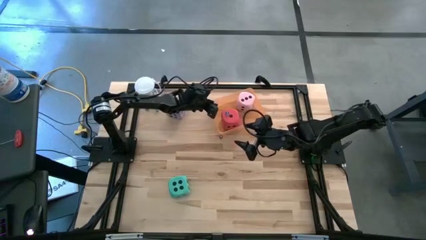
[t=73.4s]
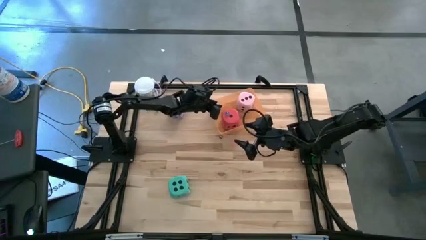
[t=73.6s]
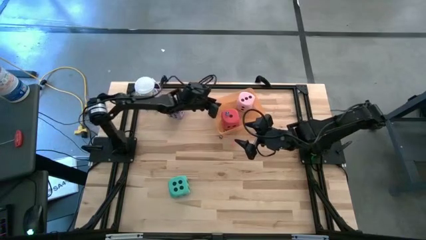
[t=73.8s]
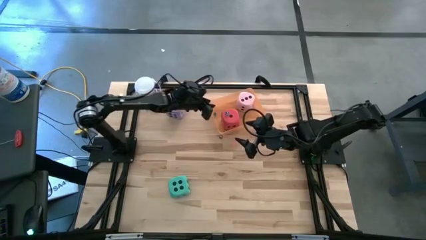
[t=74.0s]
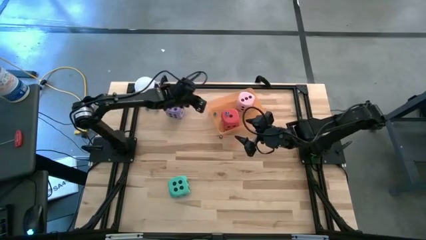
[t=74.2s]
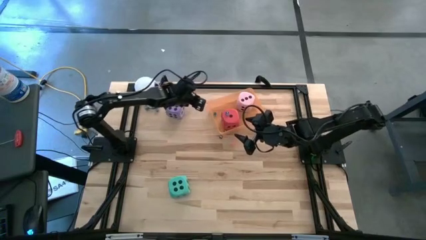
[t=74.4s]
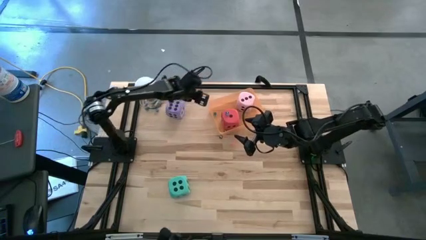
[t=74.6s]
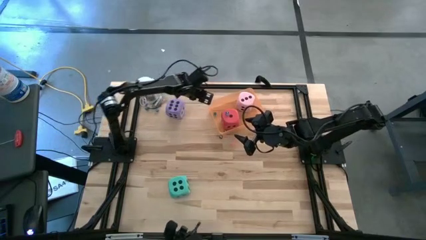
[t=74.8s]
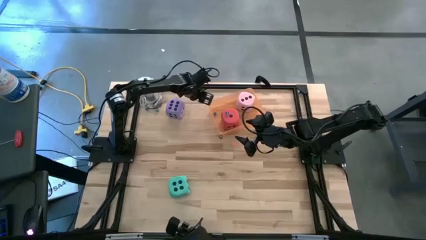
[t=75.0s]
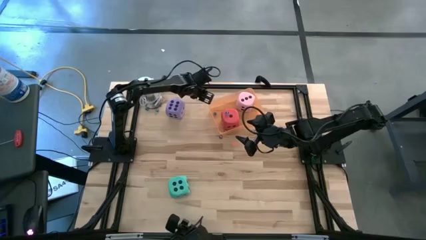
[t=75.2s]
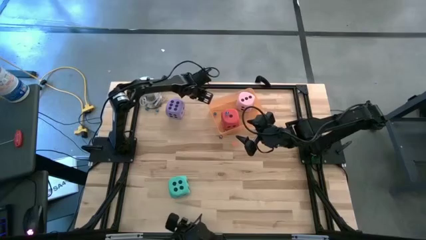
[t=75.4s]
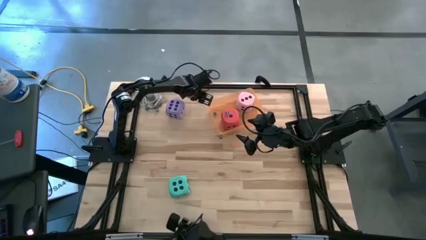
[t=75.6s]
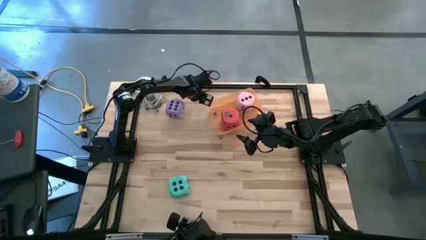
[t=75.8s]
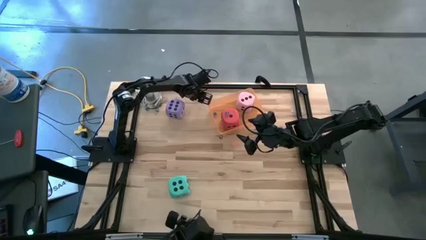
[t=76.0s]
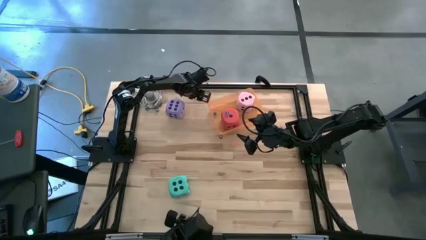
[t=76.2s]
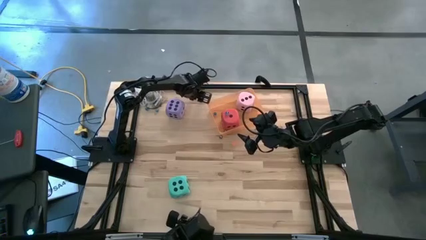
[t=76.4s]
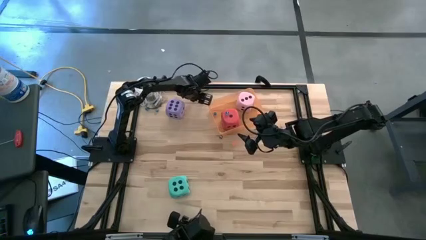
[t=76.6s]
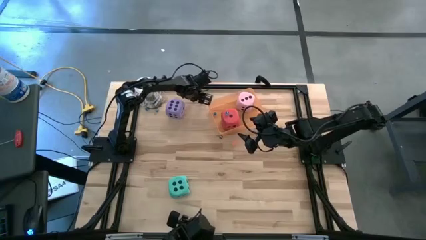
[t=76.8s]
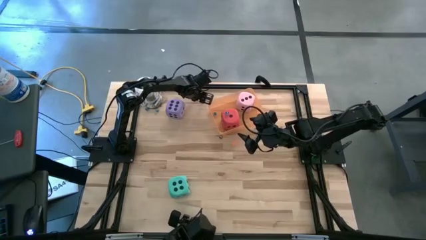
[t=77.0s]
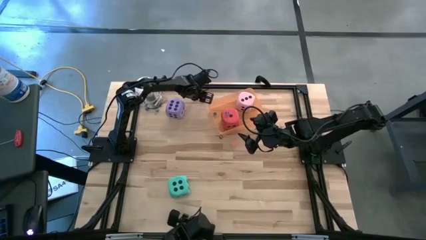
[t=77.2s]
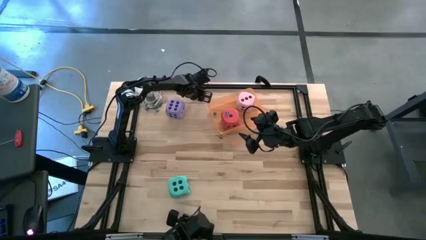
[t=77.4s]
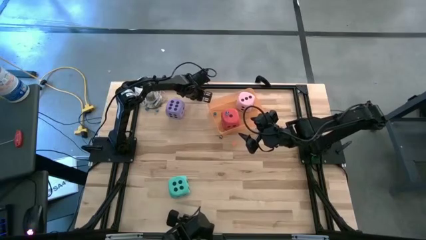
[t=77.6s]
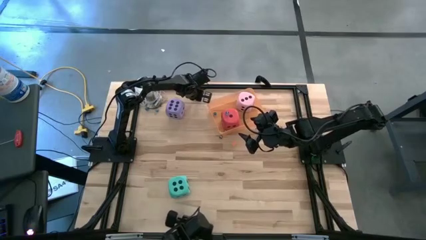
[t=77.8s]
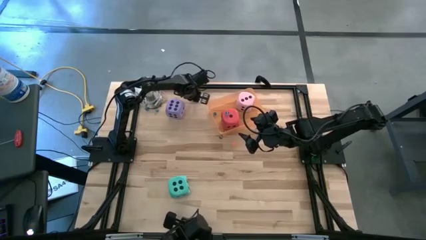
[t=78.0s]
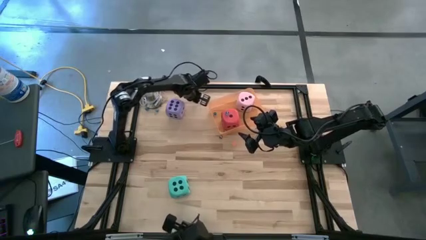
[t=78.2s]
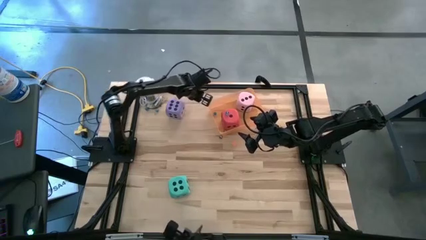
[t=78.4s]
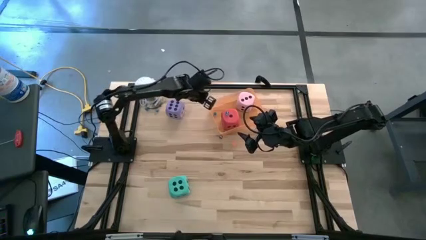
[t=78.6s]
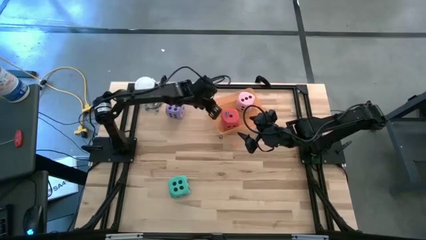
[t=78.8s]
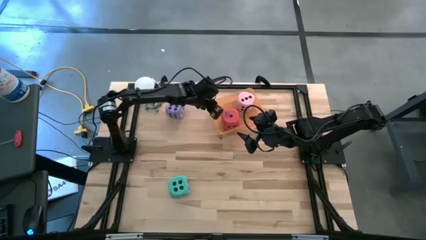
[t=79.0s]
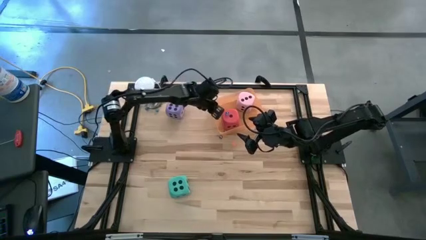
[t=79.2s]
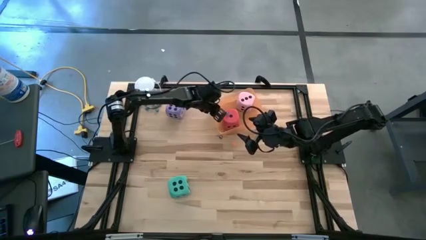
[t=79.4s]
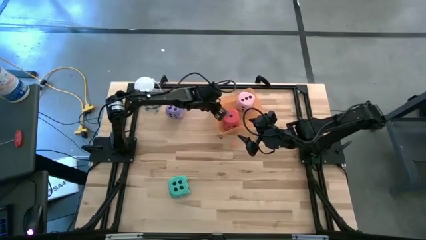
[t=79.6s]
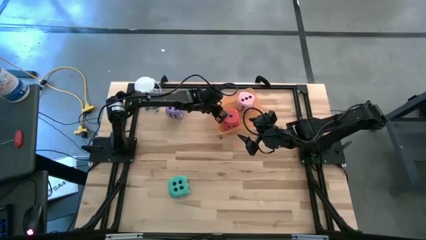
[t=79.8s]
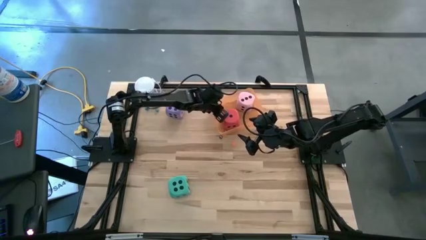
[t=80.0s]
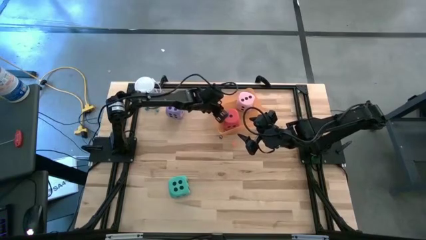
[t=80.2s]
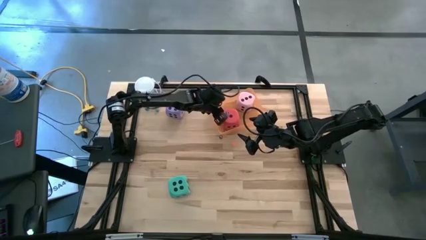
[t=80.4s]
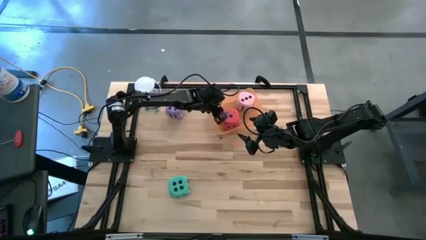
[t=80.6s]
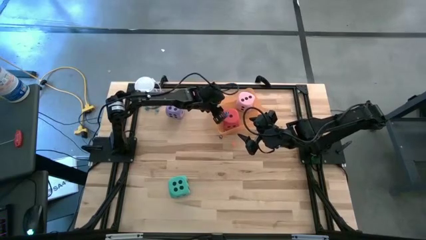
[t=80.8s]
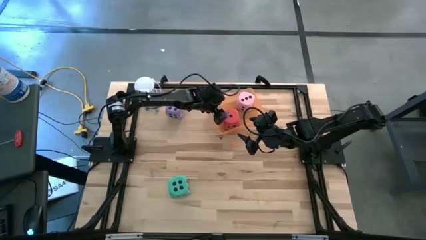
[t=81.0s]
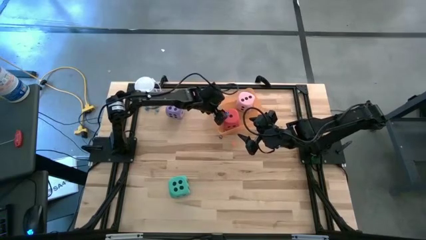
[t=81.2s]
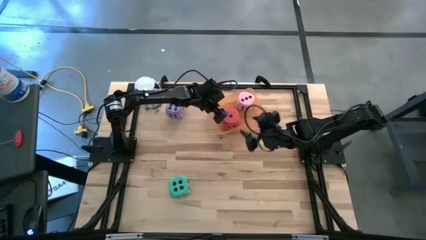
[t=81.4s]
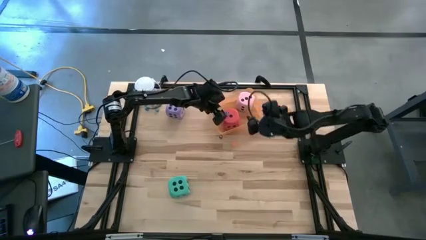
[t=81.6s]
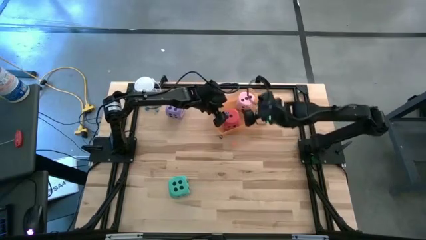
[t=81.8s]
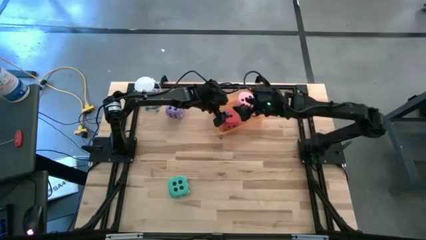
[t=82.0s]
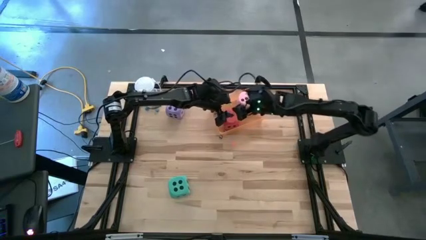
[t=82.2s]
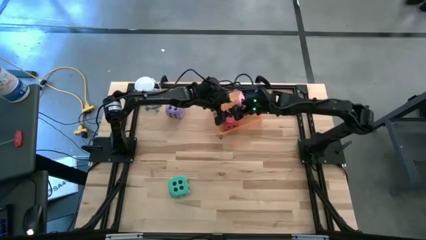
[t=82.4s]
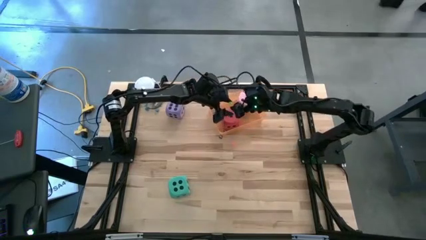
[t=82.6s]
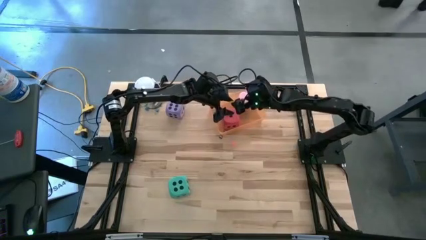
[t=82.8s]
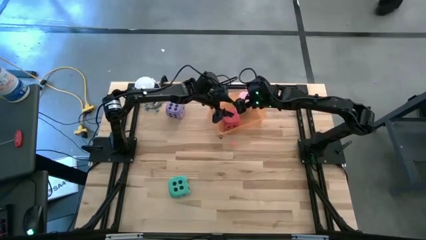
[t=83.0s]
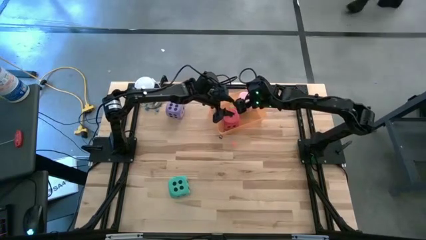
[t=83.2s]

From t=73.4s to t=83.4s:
Task: Pick & Place Dice
Put the small green dice into the orange bin

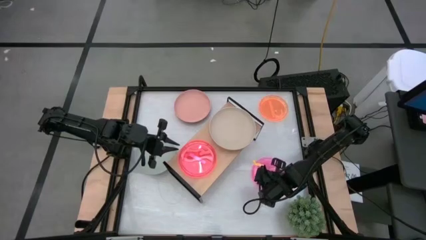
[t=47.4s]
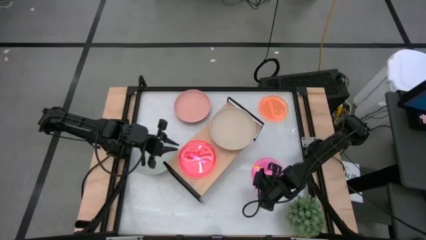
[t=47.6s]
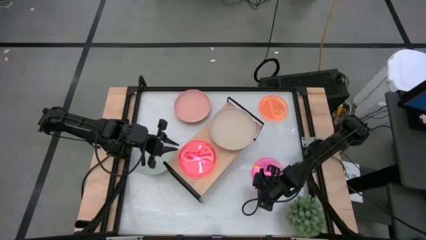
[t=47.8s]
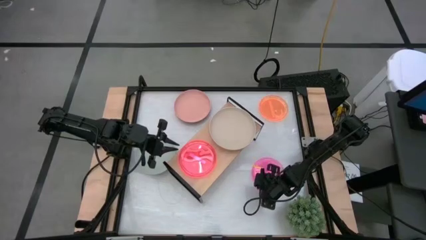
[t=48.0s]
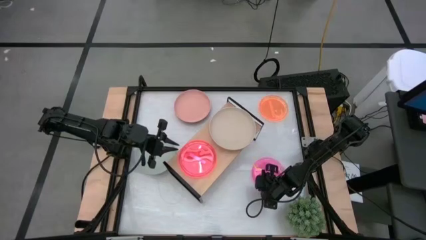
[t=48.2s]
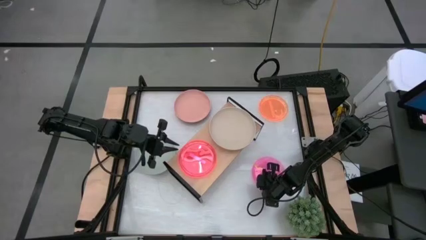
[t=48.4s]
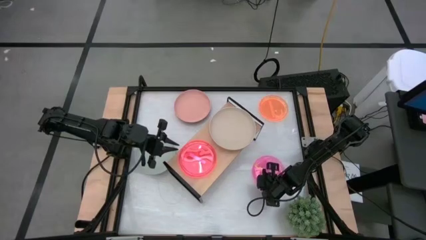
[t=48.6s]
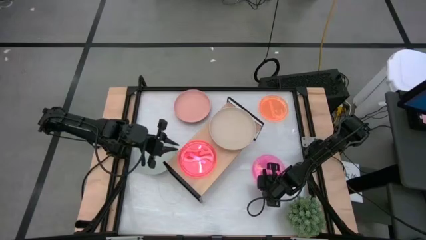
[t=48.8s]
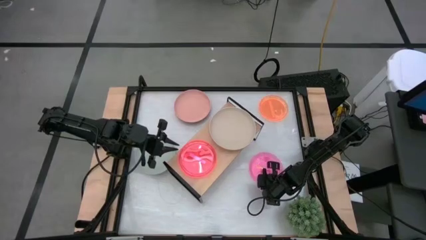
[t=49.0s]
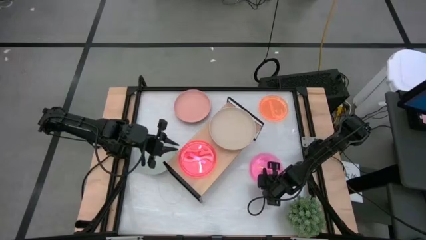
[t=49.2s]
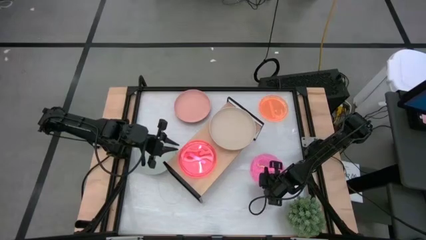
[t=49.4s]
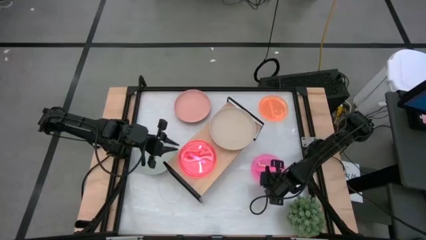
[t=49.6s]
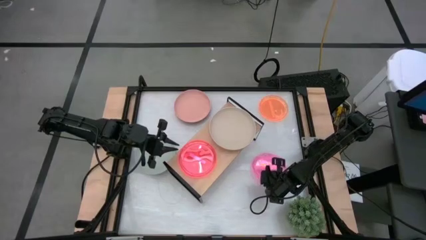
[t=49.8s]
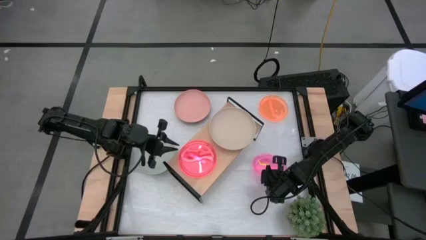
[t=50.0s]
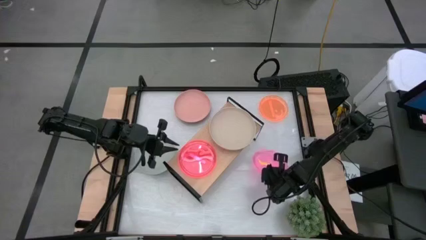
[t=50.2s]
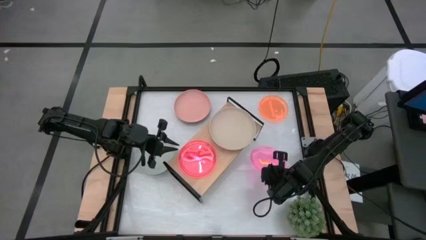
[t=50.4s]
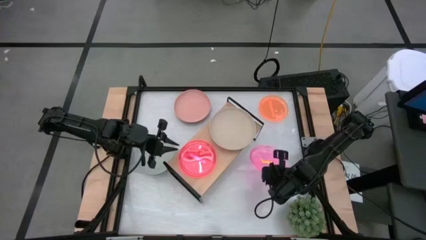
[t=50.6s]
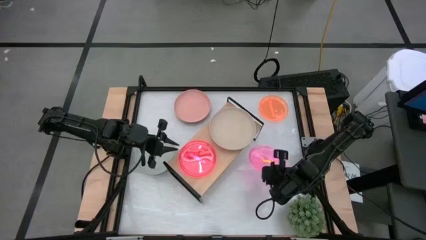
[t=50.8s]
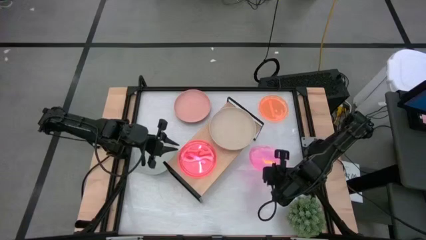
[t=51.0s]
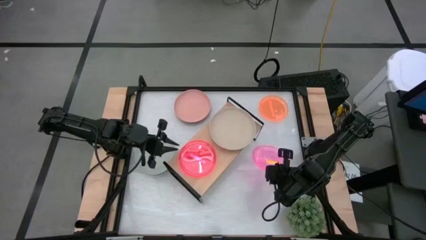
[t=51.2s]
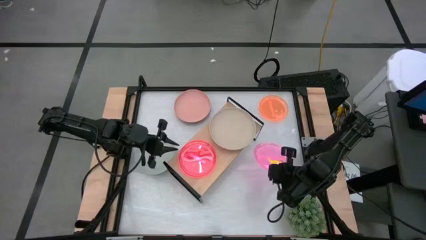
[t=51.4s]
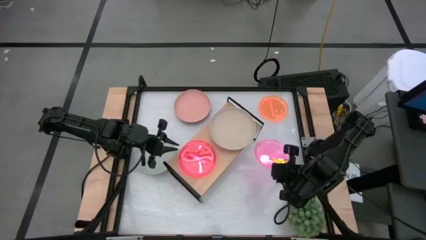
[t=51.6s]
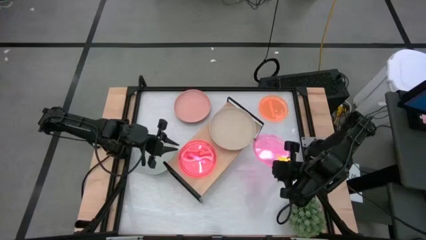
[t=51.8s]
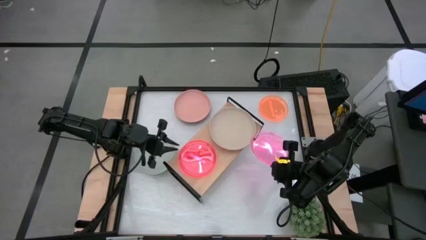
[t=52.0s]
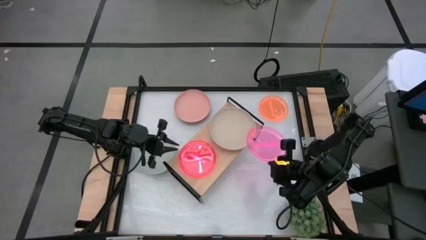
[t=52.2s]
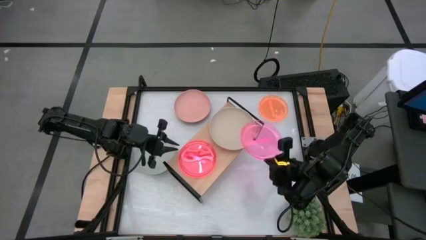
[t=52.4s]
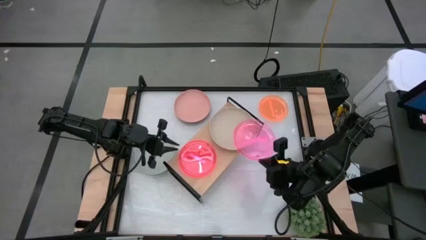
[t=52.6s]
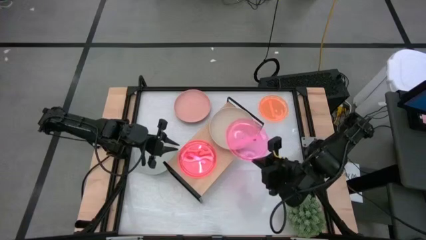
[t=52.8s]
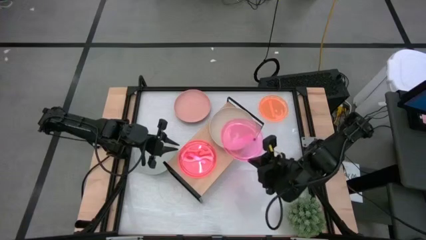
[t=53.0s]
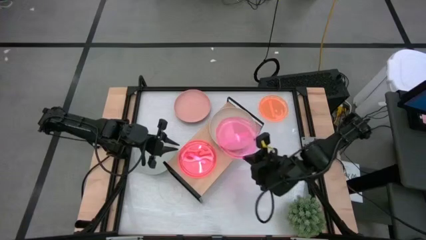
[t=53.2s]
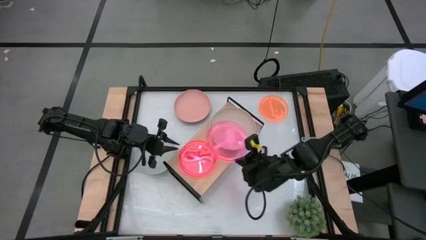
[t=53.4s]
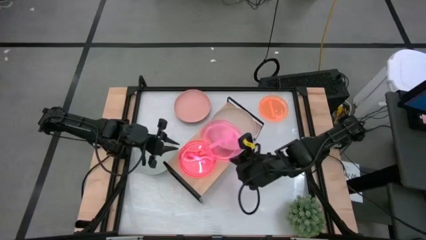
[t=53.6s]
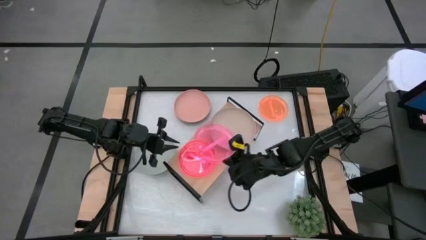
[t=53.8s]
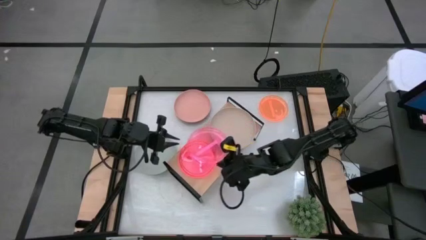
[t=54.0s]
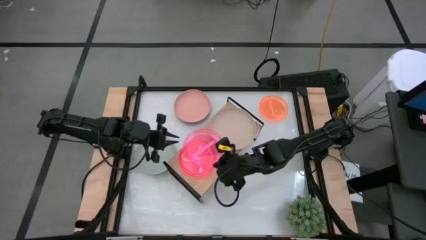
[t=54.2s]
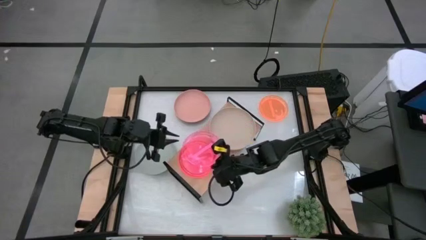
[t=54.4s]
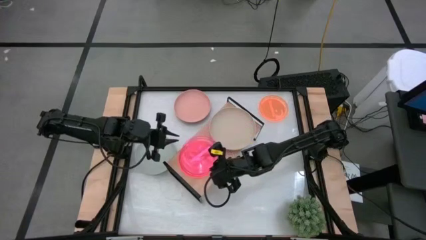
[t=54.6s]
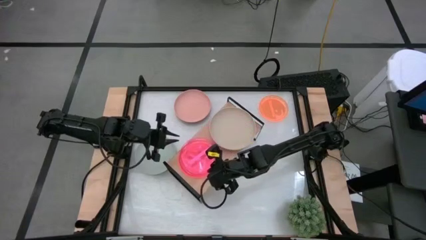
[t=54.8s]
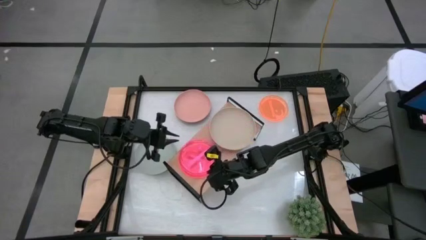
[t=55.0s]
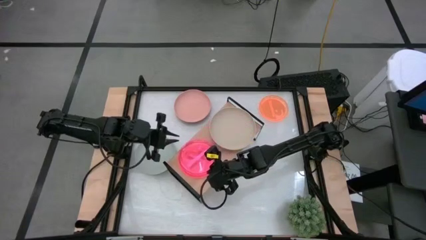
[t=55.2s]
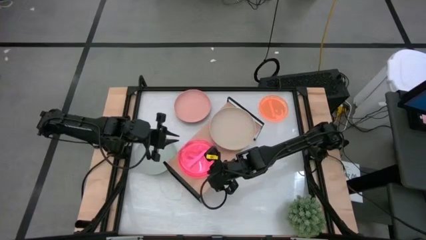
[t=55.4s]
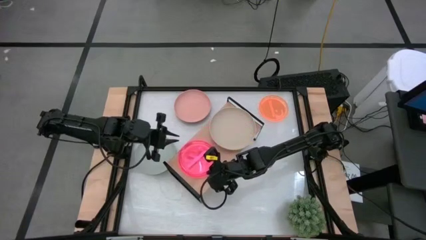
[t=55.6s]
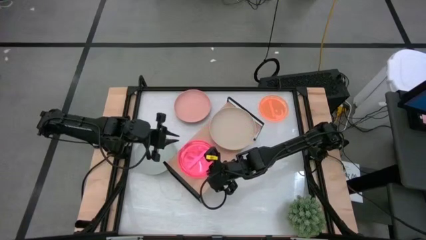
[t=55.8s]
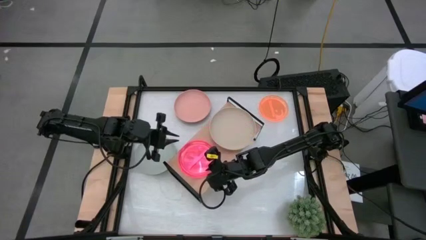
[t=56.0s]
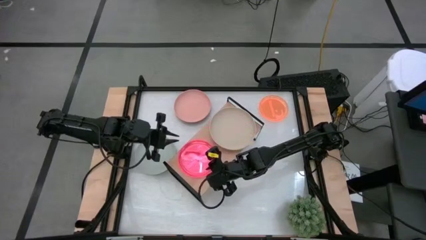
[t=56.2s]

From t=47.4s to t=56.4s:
Task: Place and stack plates onto a shelf
Stack the small pink plate on top of the small pink plate on the shelf
